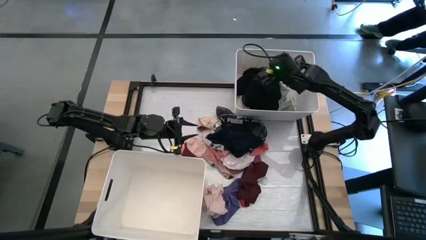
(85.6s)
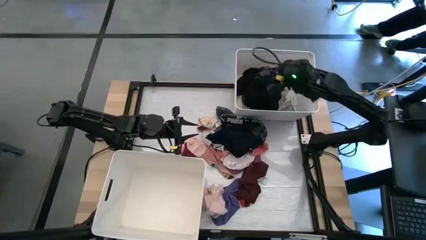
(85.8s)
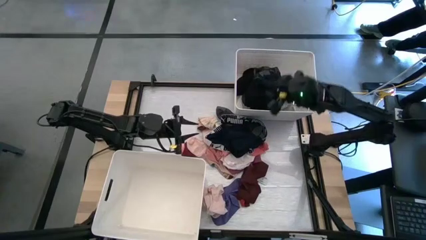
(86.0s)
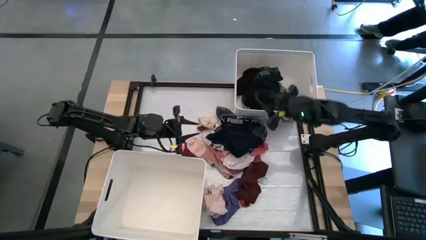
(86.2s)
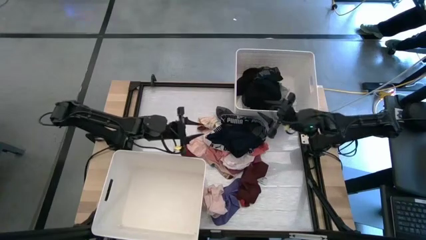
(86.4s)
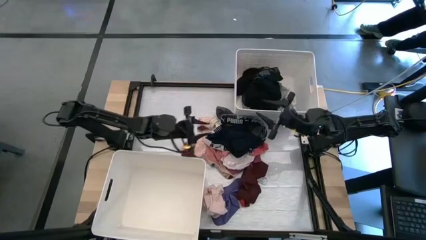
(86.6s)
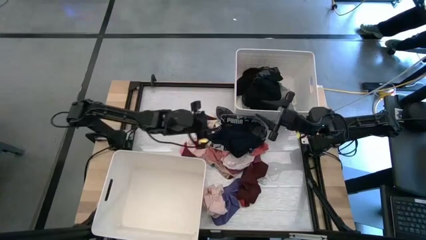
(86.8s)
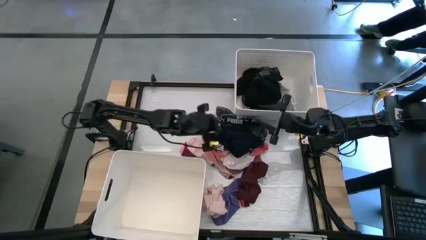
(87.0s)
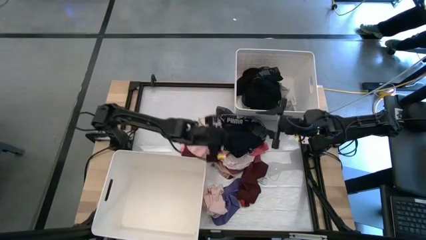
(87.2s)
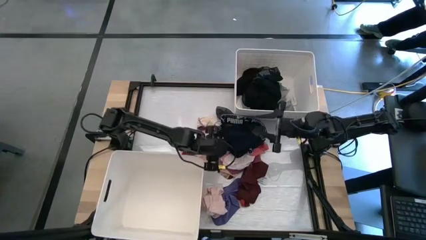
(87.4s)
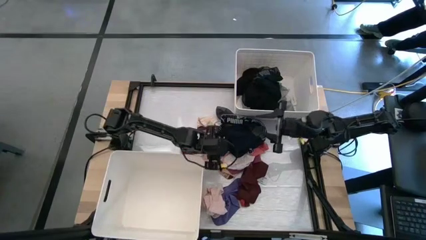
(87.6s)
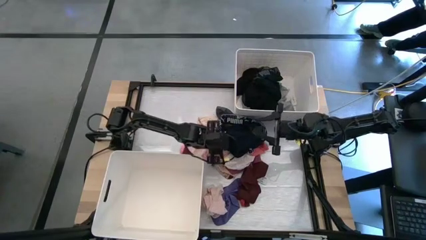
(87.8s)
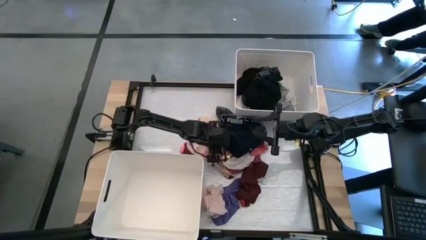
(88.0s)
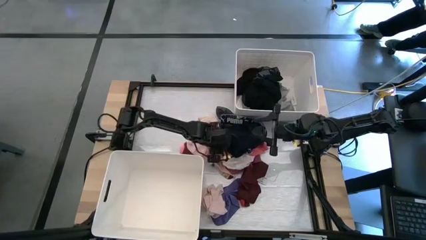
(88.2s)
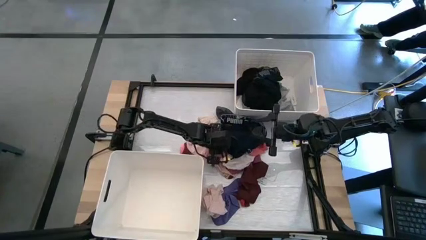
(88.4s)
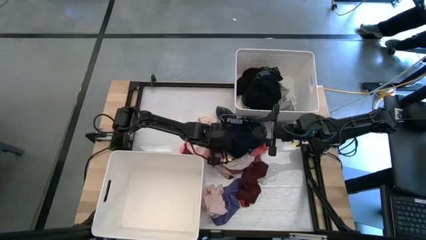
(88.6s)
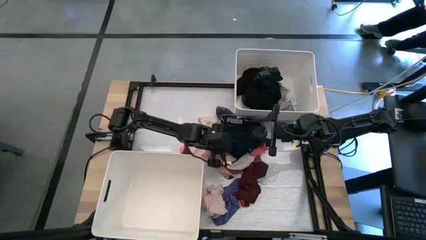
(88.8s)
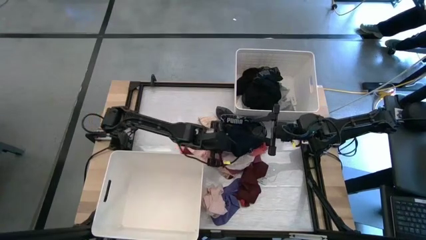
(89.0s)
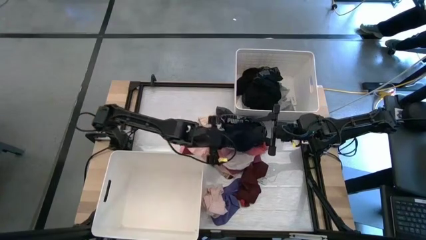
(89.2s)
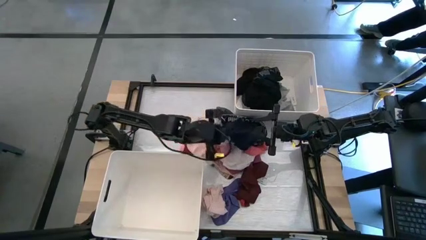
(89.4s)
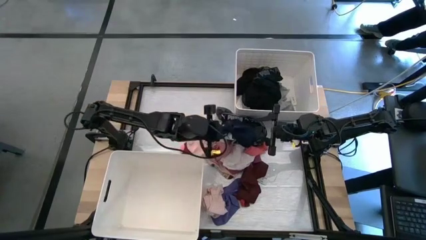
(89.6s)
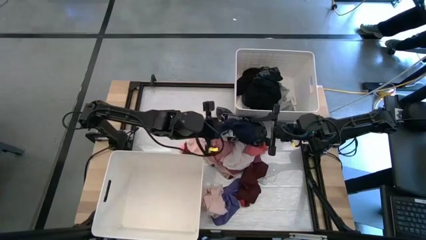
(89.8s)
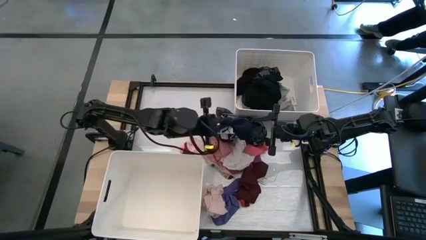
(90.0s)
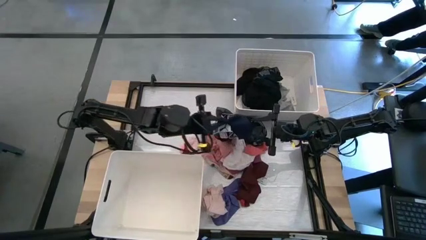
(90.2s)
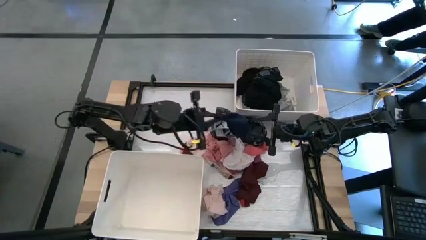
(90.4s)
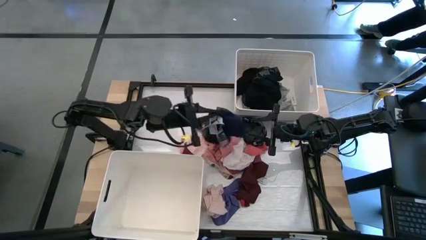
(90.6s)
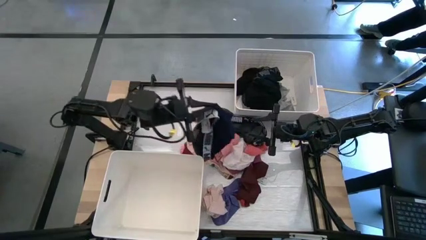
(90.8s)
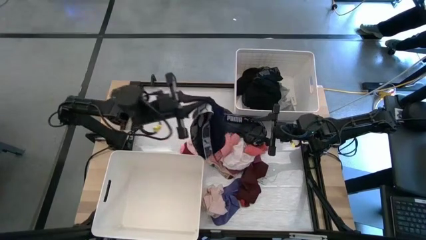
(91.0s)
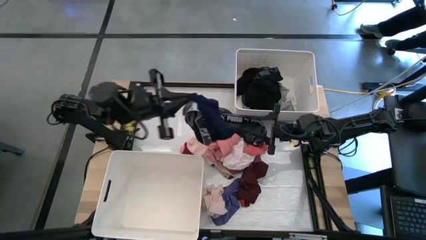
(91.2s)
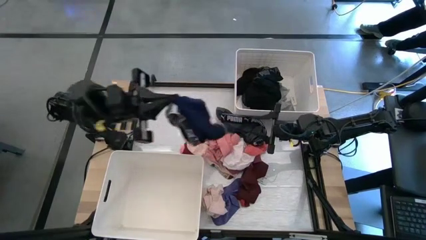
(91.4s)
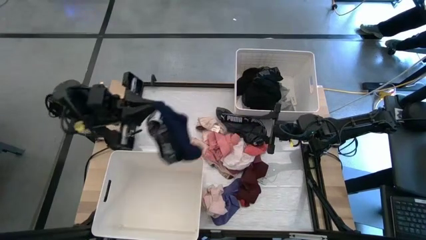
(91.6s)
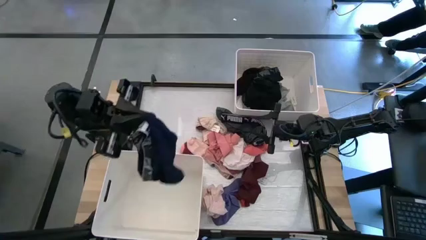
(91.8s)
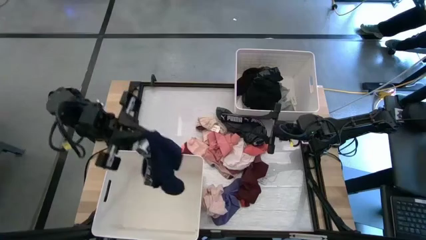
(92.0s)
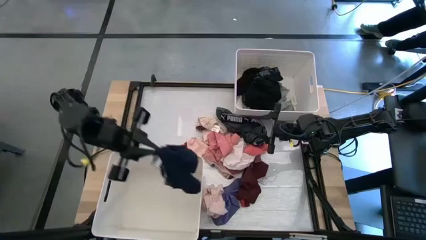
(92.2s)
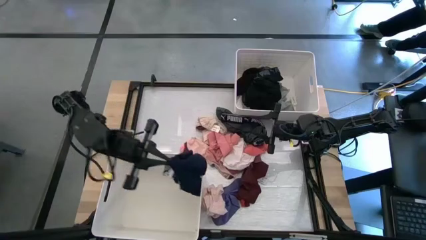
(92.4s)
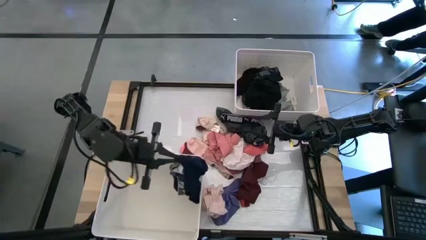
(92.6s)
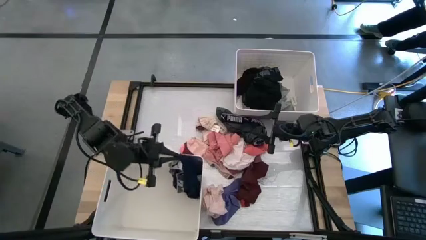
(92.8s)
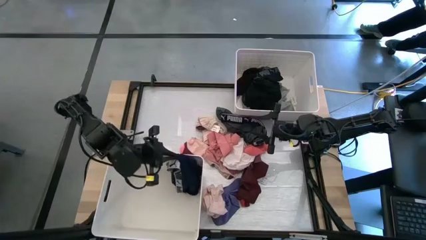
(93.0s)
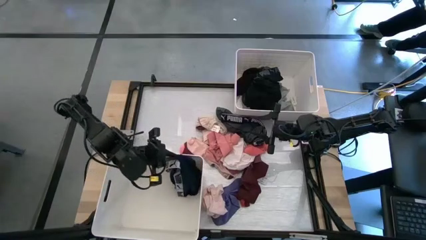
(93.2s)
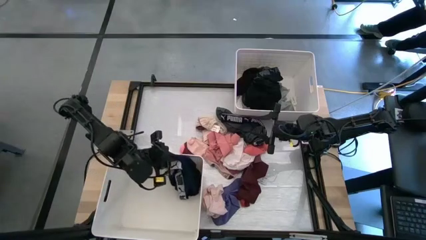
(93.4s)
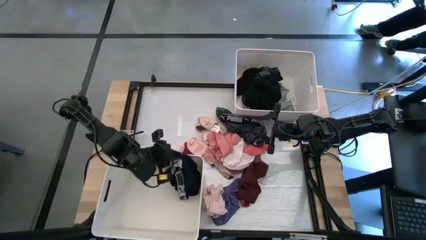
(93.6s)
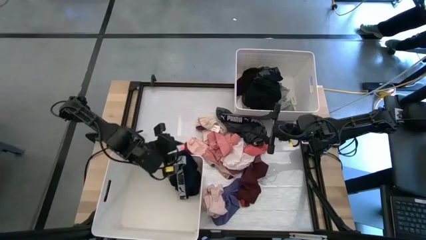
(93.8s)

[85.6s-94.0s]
Task: Sort clothes
Put the blue underwear into the bottom white laundry bin

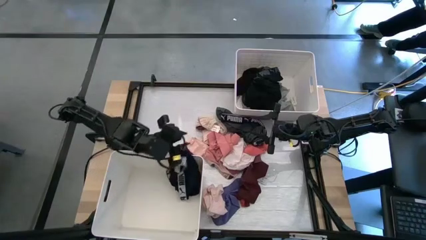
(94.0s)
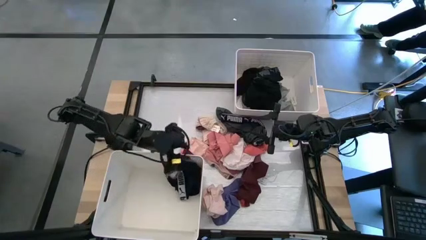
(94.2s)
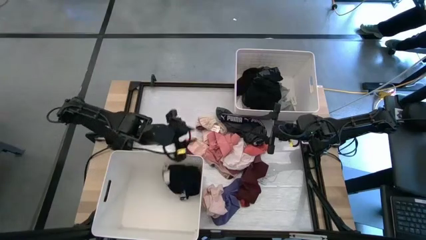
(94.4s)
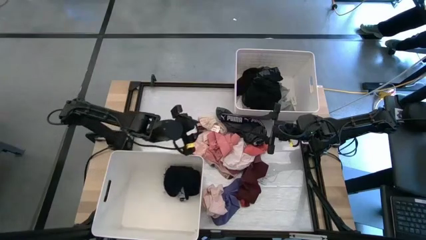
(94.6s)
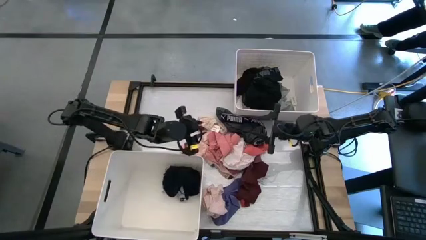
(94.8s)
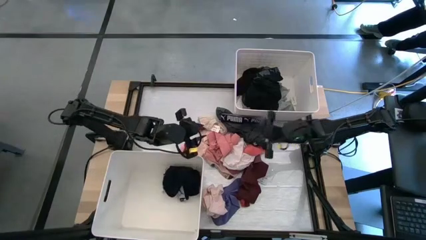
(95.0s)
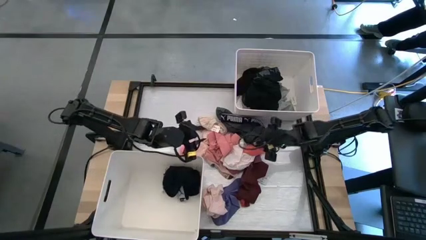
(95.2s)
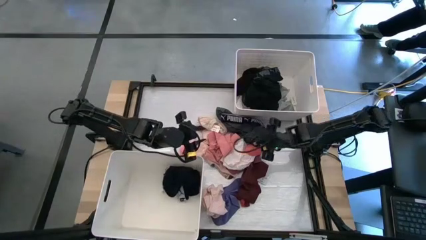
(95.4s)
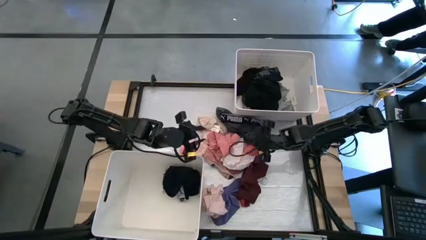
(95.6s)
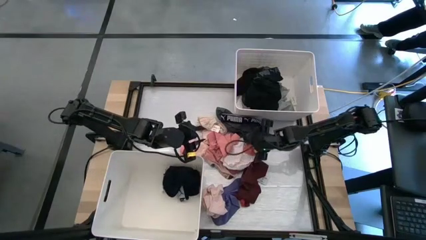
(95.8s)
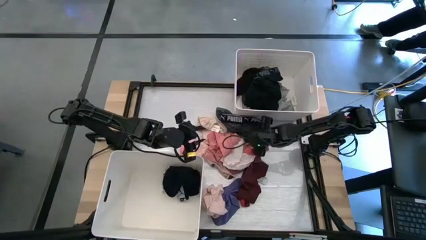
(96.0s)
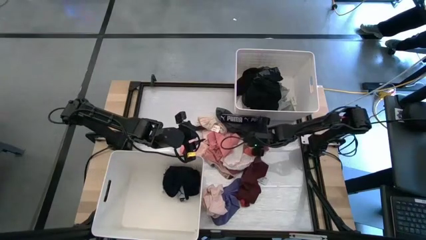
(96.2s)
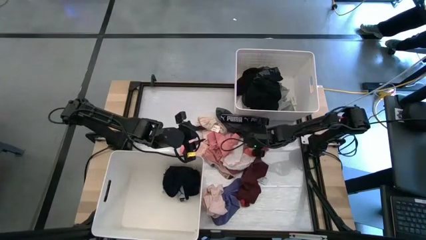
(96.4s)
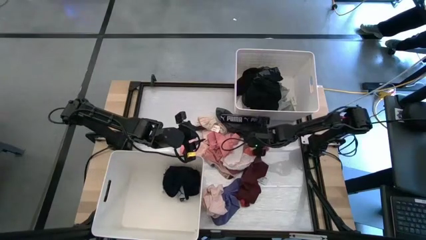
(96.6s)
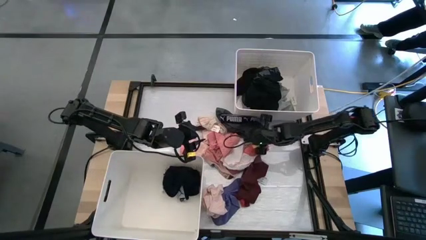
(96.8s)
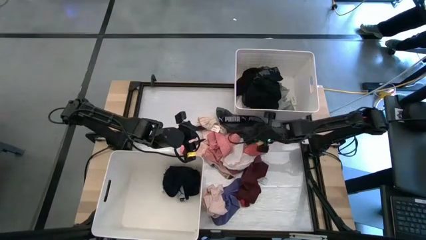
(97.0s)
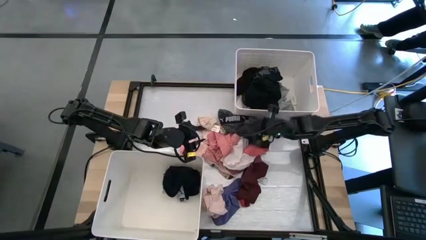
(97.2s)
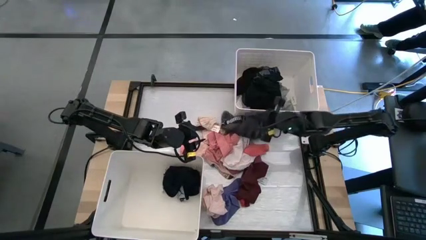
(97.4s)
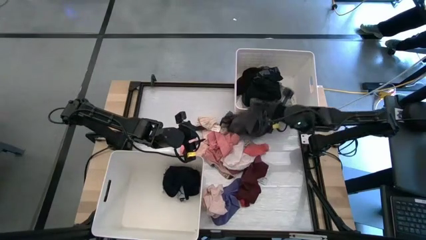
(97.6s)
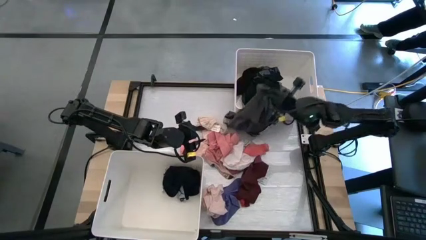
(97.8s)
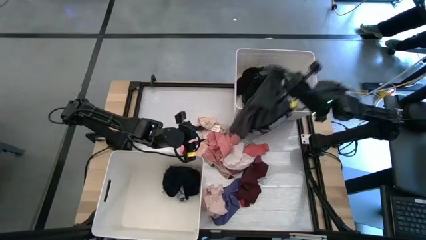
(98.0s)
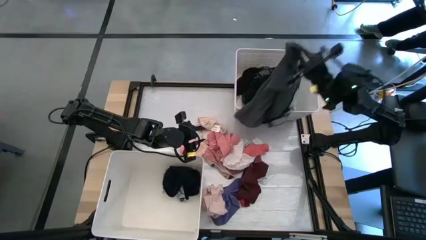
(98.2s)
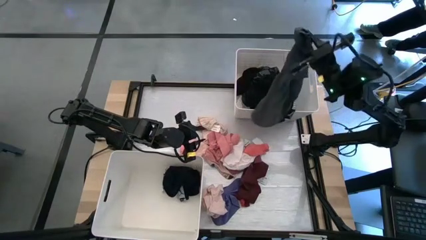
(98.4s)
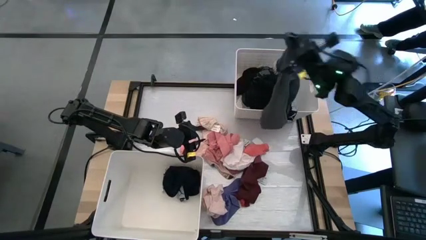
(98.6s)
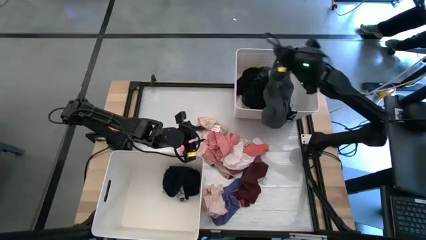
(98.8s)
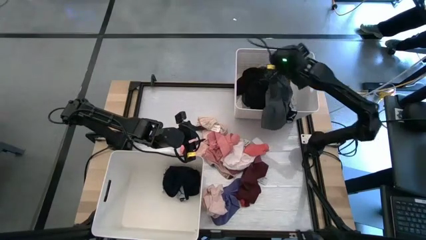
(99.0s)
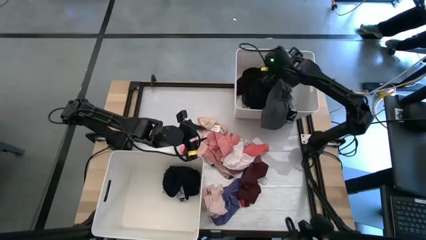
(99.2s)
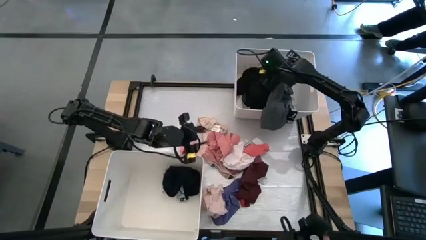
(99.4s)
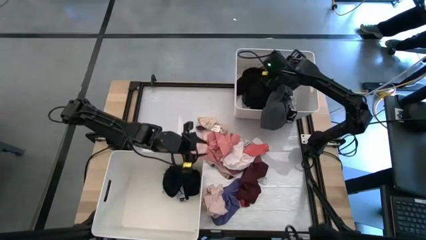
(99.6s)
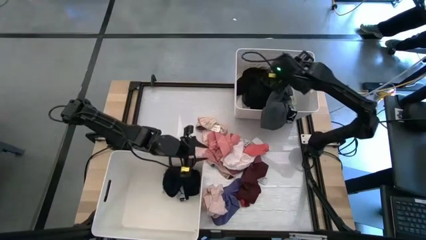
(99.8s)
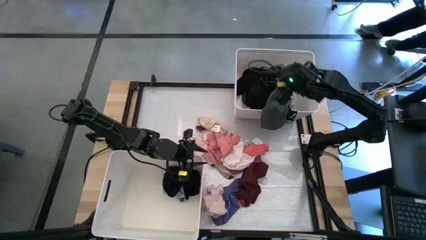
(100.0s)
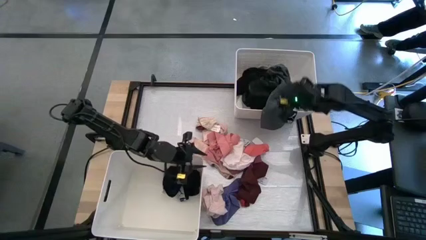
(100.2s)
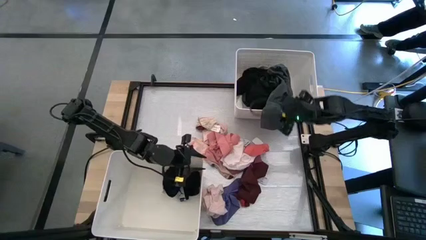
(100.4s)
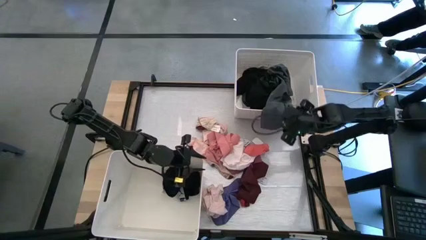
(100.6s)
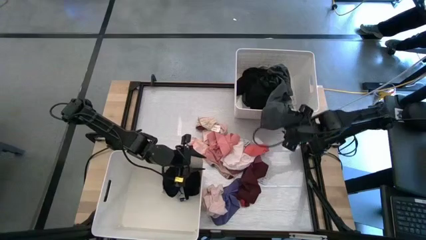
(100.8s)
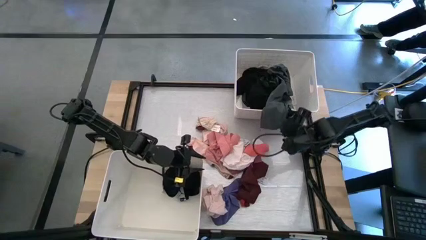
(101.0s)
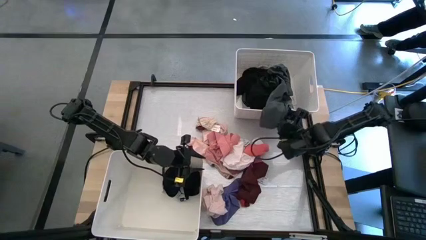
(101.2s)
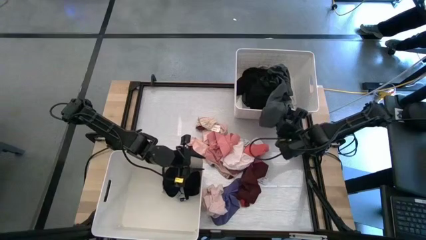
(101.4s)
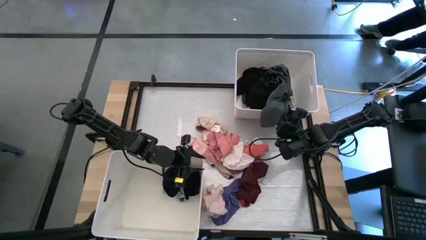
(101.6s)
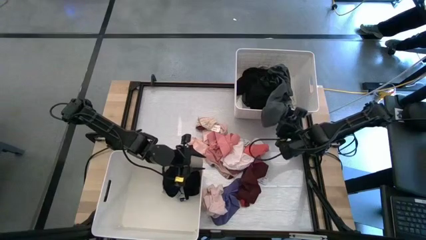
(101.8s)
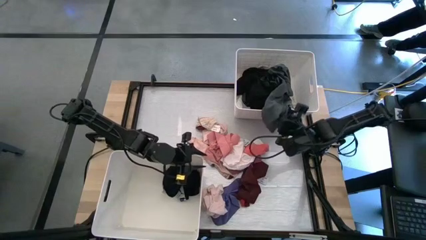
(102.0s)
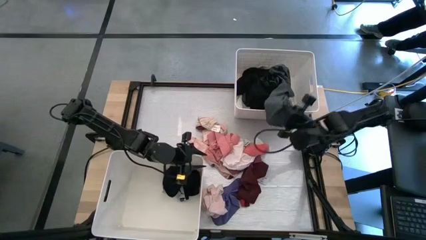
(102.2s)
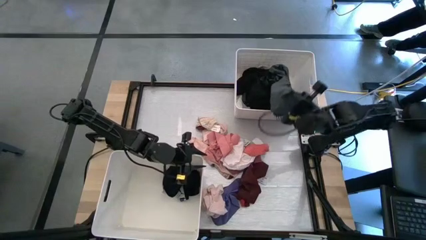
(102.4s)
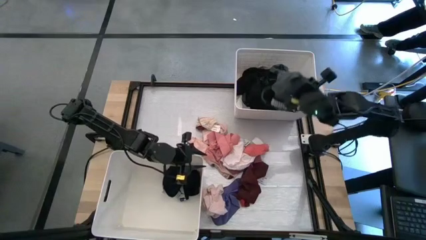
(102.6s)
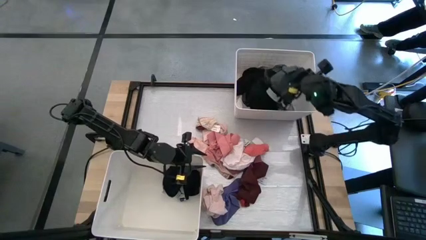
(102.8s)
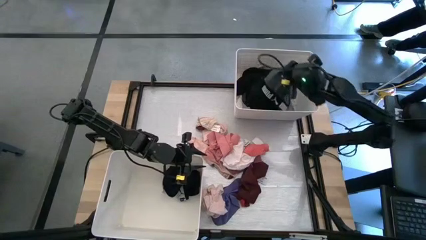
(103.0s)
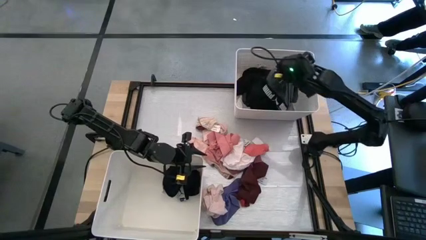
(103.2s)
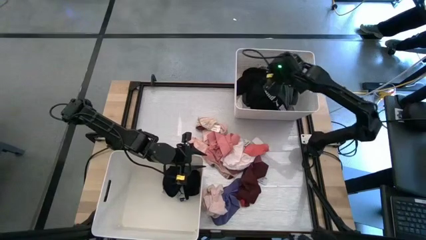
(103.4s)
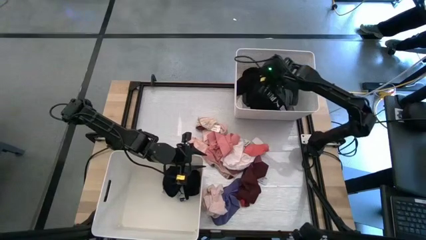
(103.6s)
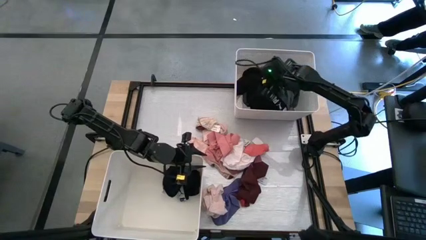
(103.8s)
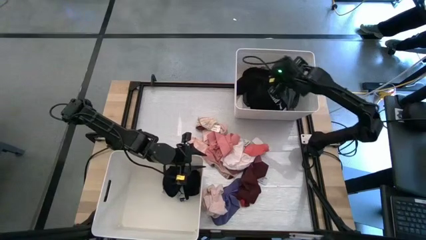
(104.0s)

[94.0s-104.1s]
Put the gray underwear into the top laundry bin
